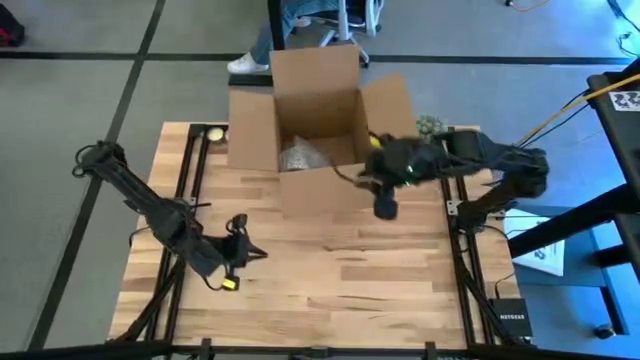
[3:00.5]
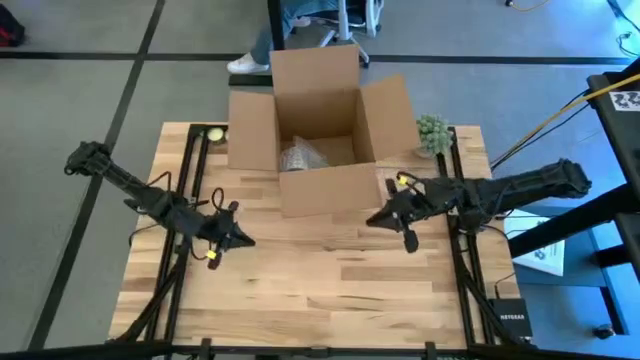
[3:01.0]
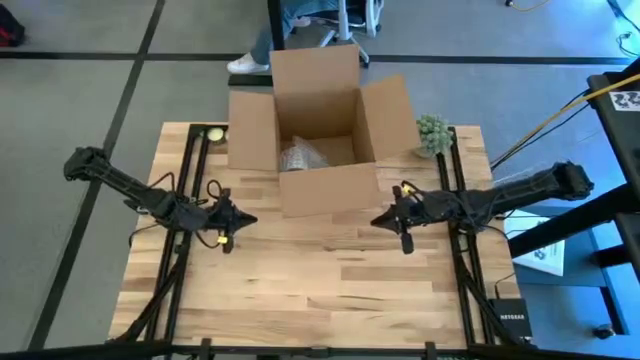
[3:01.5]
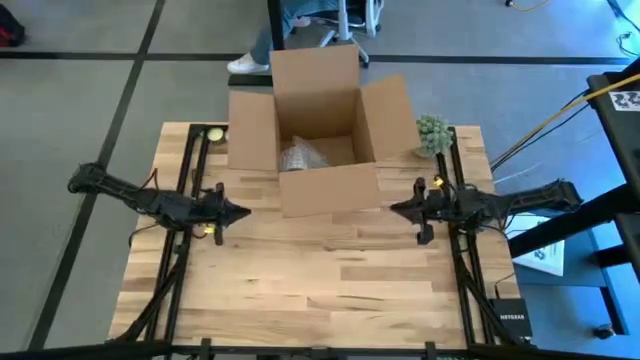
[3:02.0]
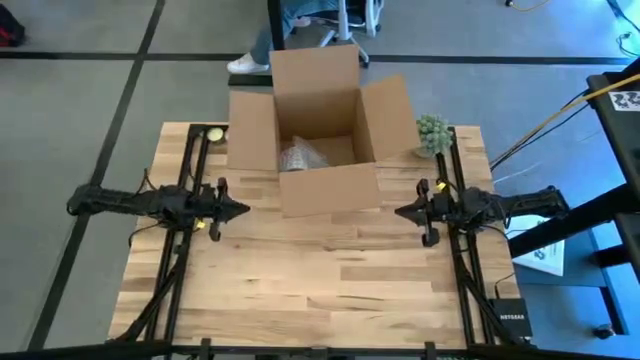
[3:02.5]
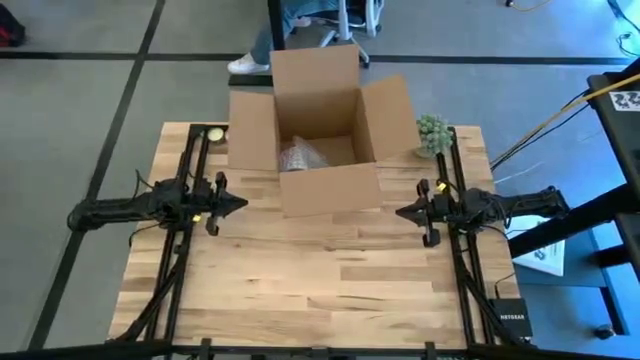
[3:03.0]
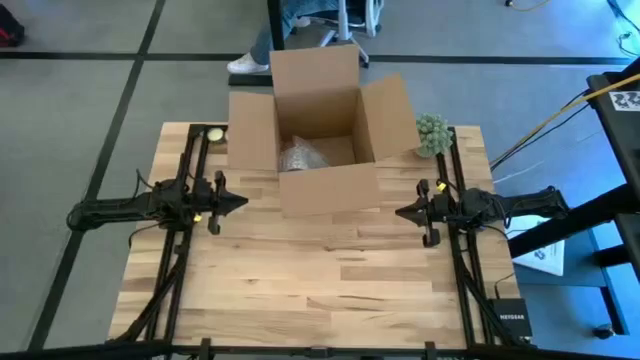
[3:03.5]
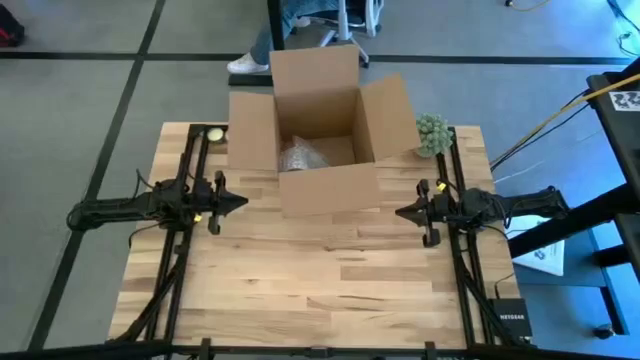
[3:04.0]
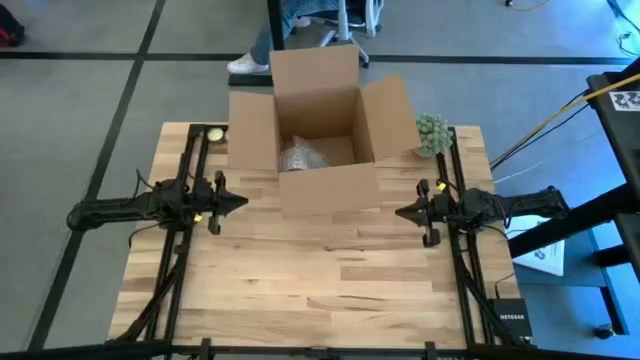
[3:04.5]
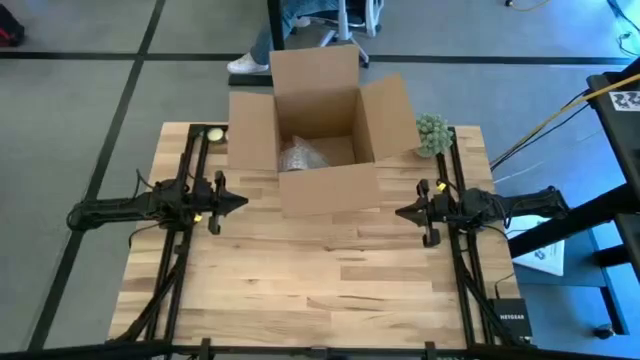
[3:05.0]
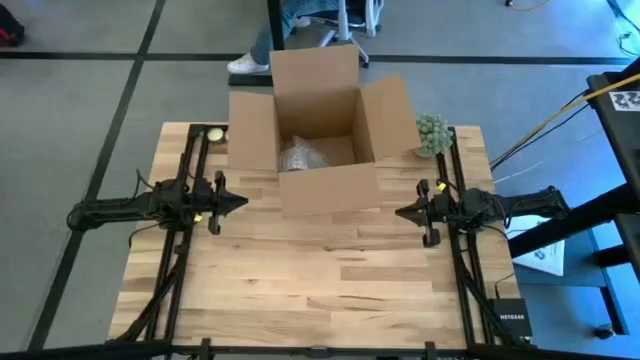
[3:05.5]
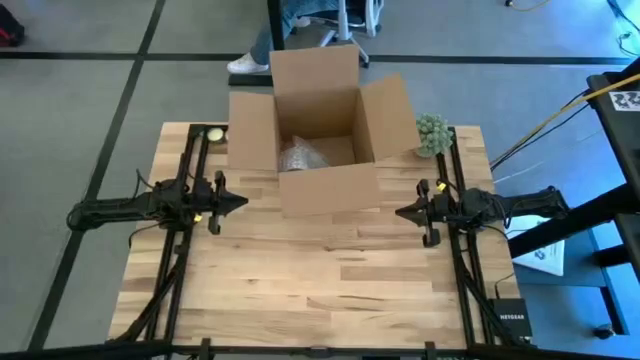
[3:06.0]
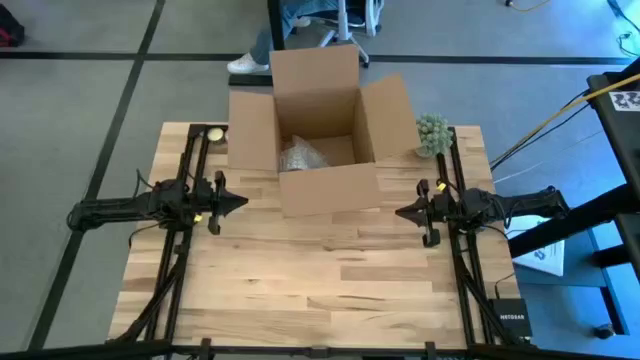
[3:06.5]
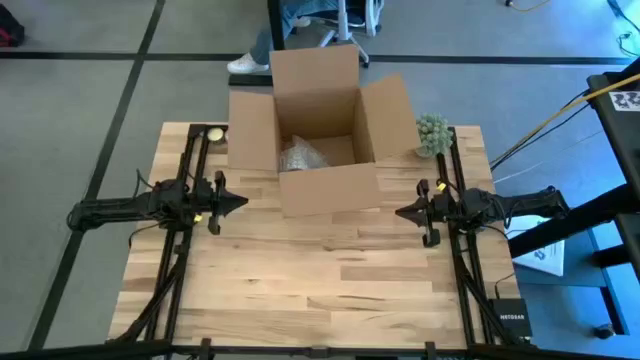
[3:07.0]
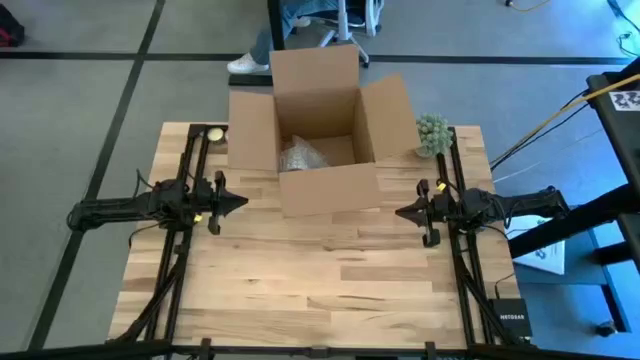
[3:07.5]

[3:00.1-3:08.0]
Task: wrap mug
Return to Home Position

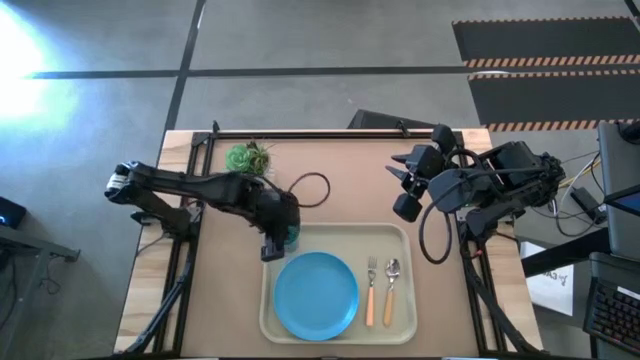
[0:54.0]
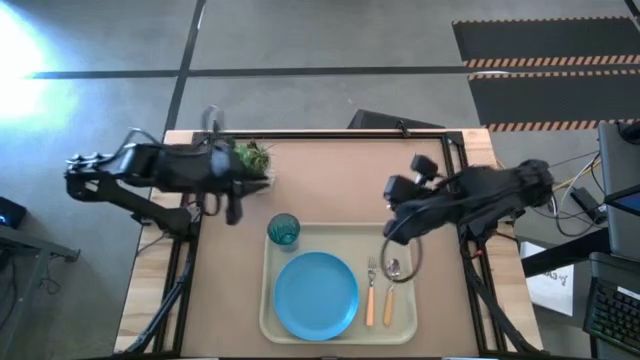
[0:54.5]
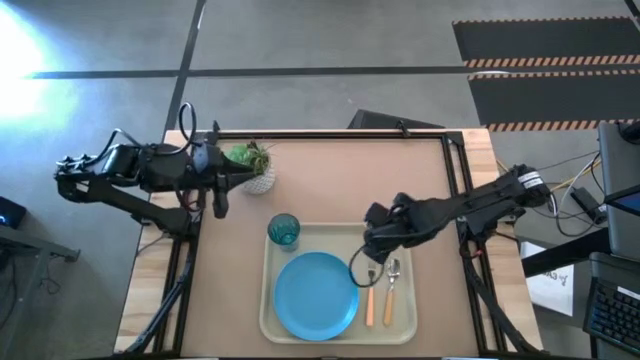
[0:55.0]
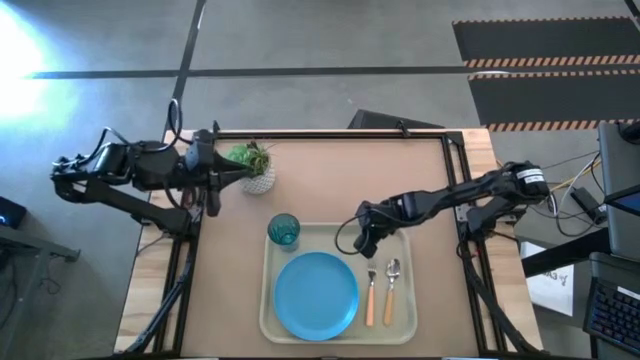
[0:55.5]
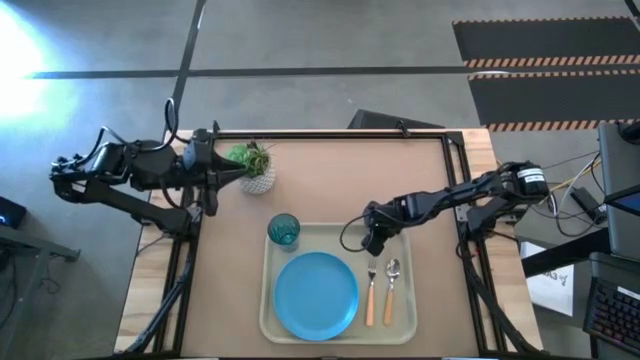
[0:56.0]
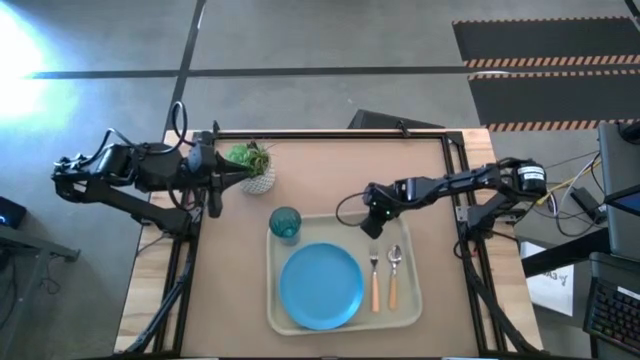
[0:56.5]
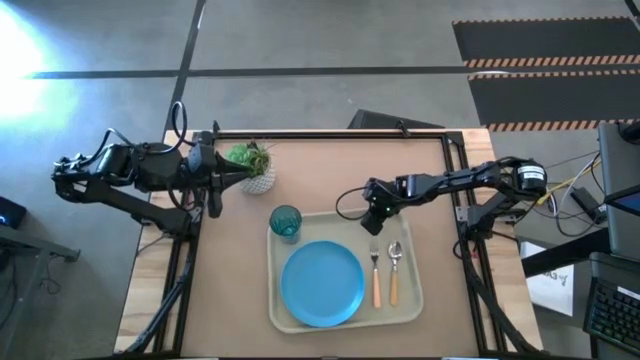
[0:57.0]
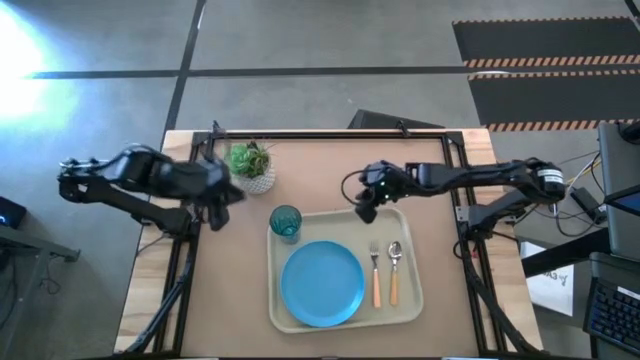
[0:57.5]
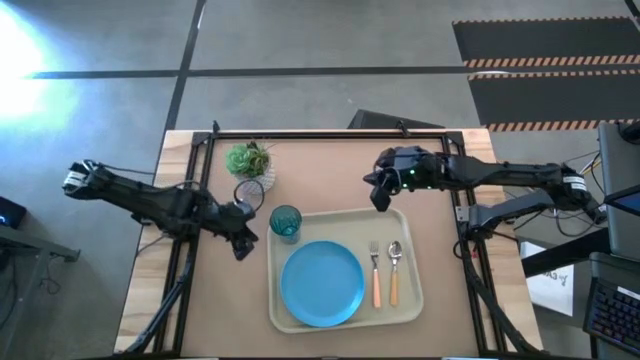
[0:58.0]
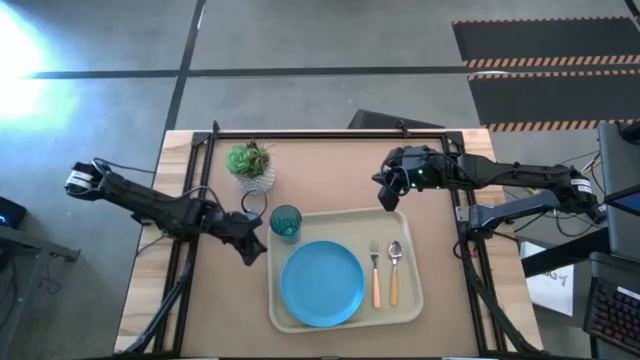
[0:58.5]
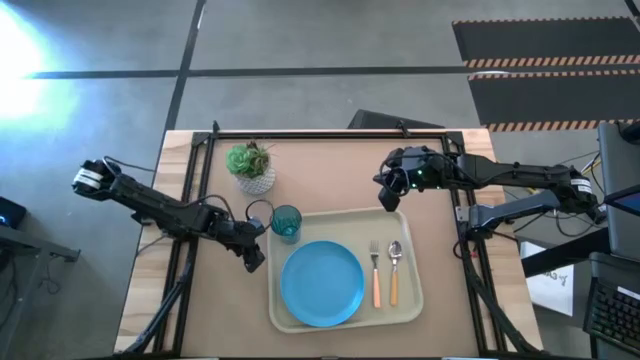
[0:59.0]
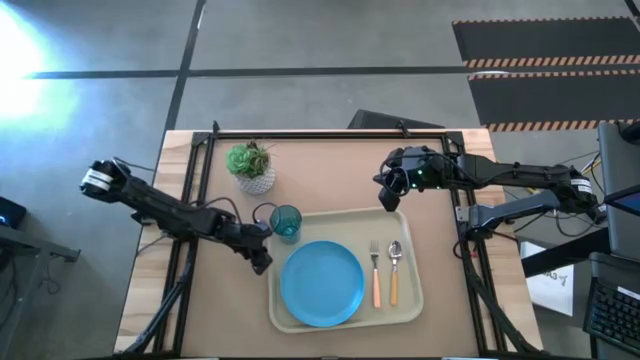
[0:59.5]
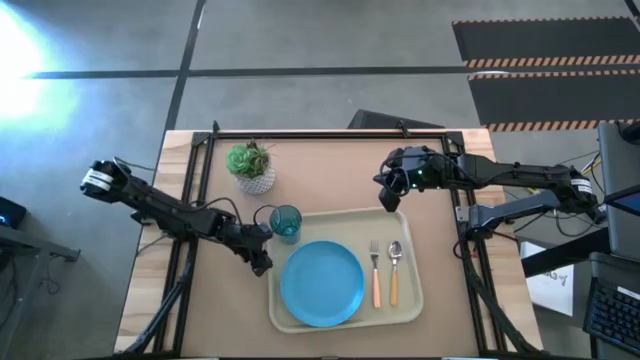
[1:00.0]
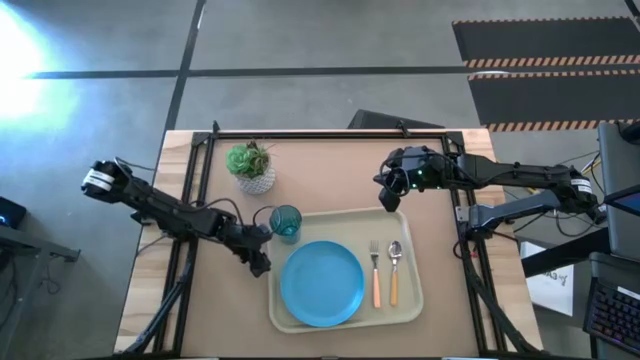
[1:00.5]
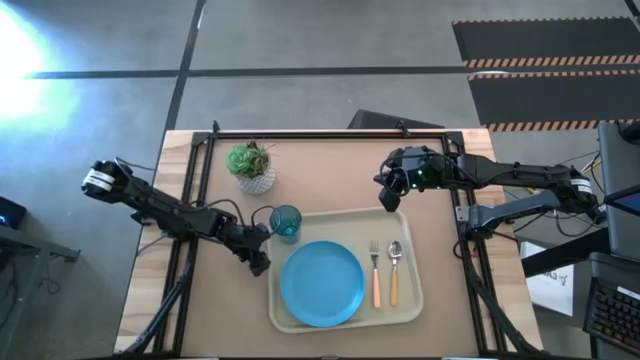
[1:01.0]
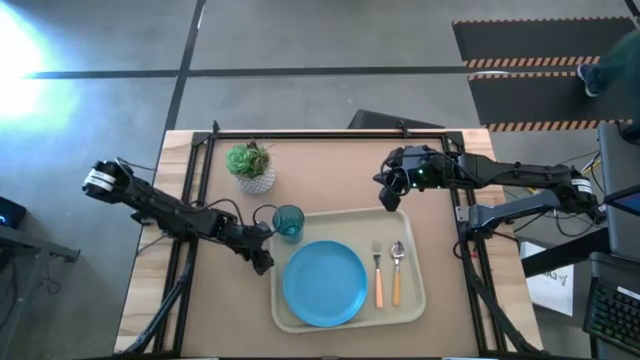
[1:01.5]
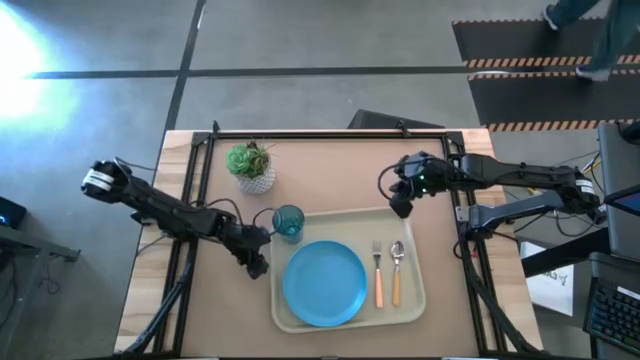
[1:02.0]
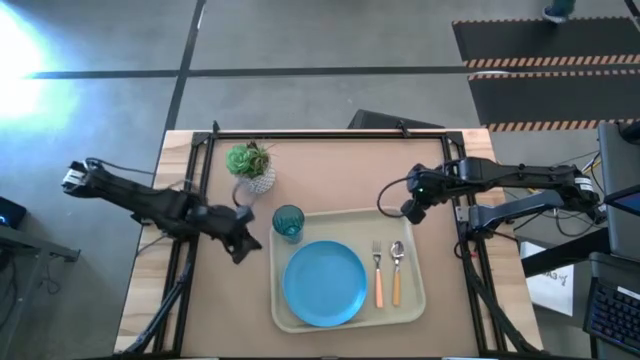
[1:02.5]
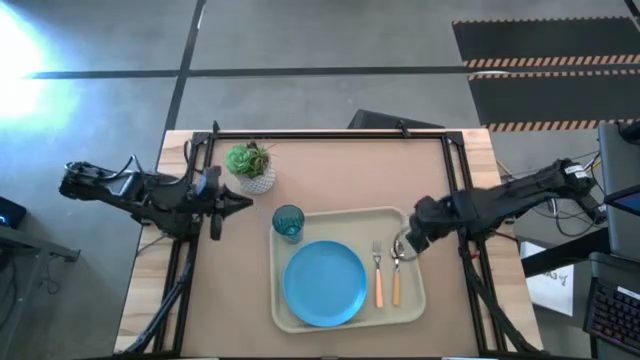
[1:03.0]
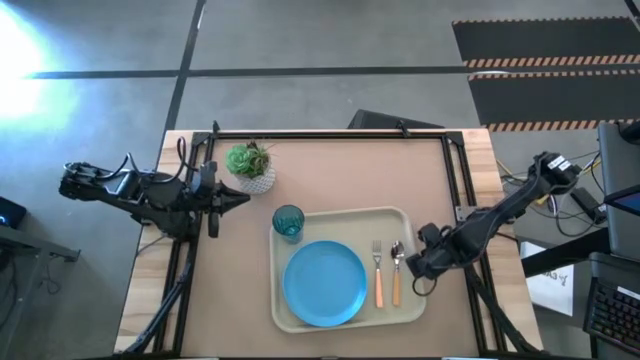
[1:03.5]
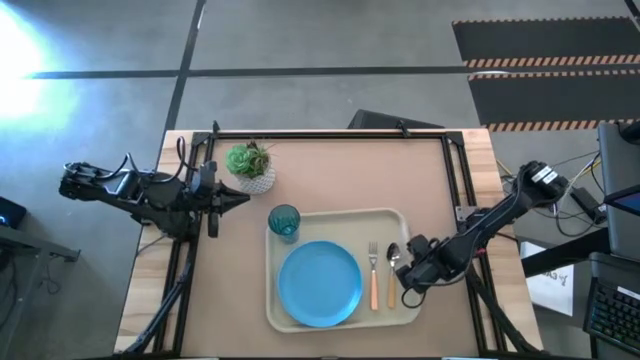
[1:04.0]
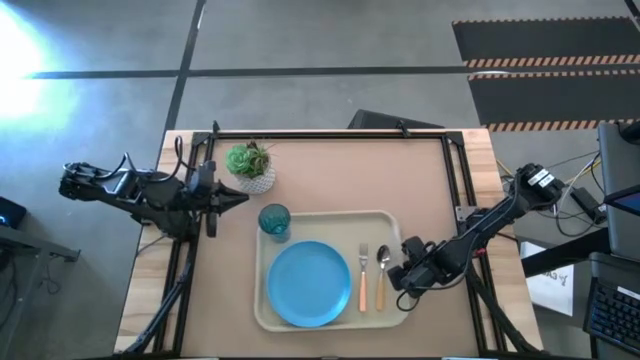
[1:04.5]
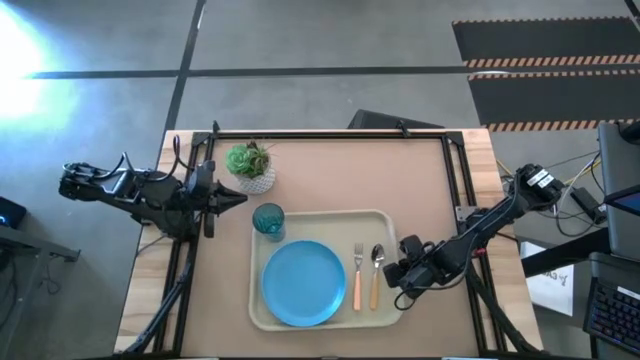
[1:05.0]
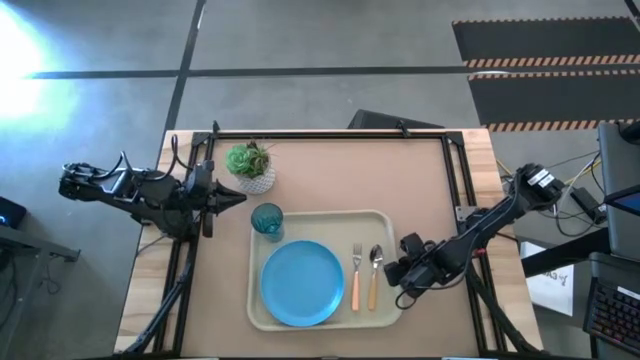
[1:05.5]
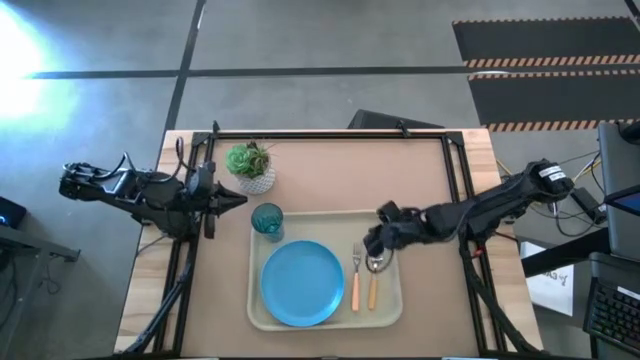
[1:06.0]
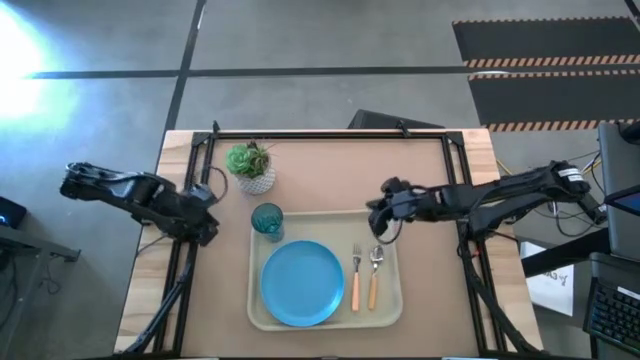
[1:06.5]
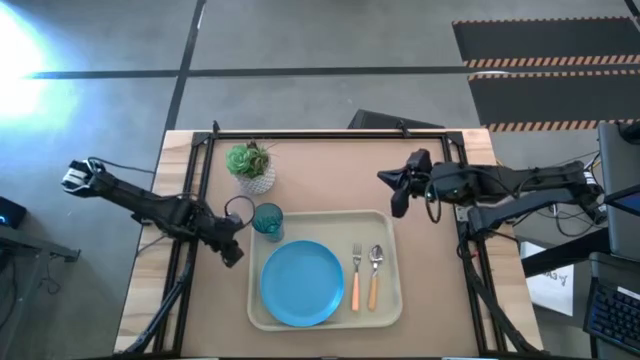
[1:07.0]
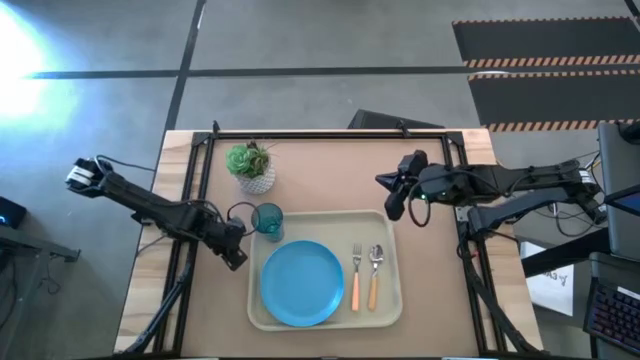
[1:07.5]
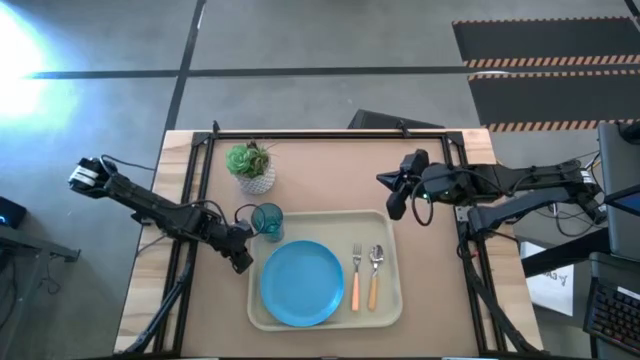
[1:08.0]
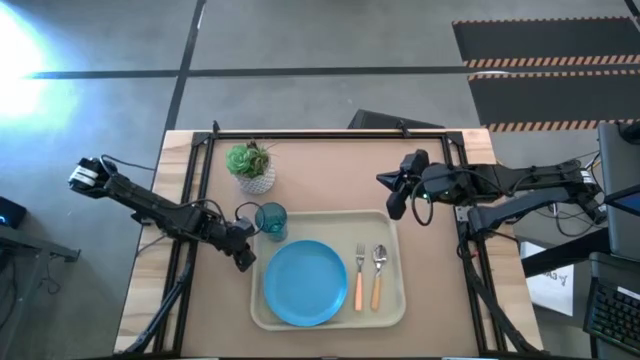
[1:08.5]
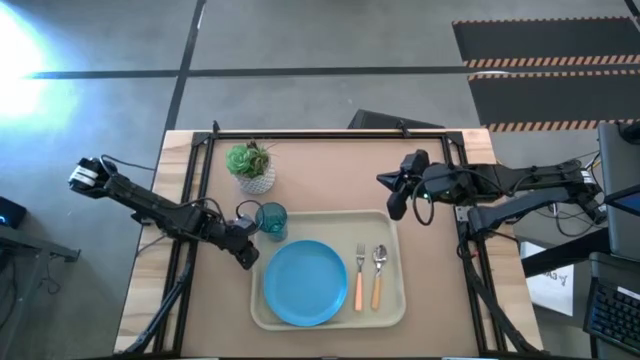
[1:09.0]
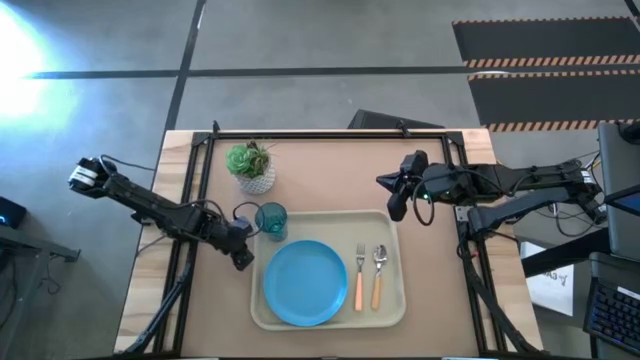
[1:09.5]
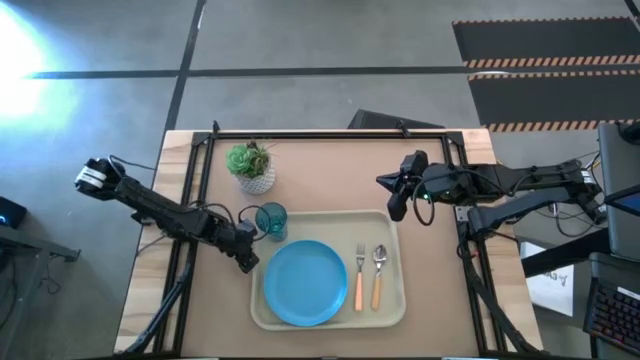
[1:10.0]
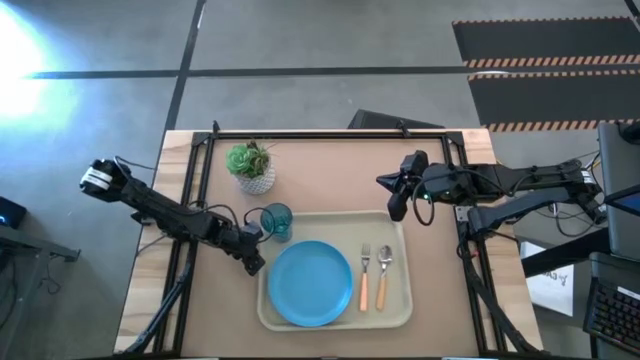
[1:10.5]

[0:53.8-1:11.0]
Task: Pick and place plate/cup/fork/spoon on tray
Adjust the gray tray
